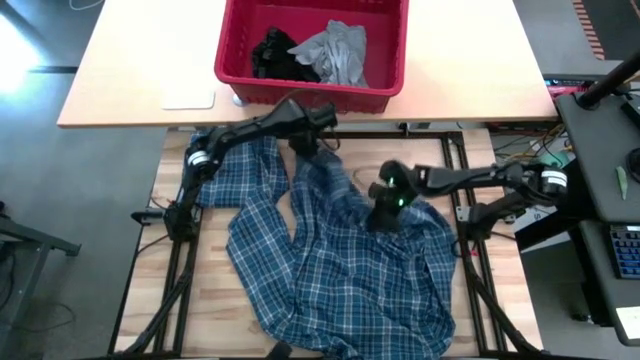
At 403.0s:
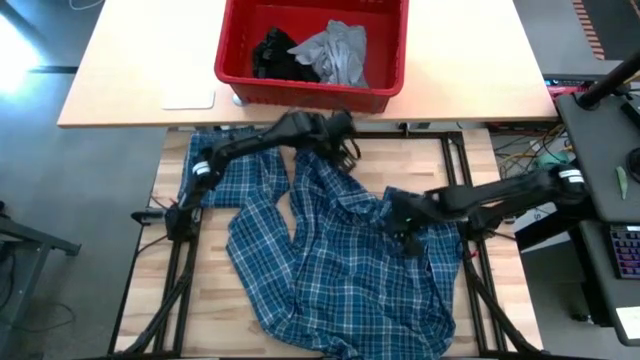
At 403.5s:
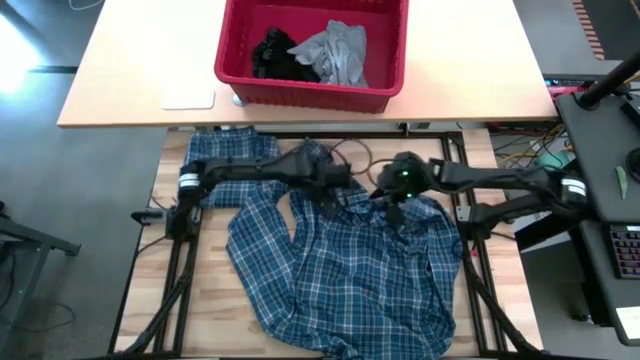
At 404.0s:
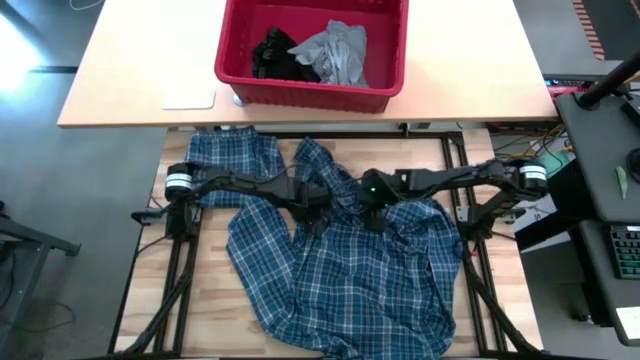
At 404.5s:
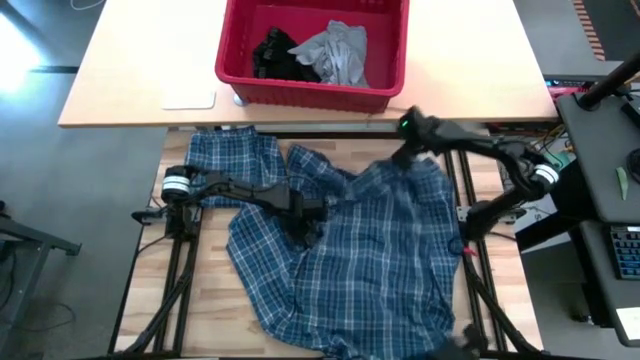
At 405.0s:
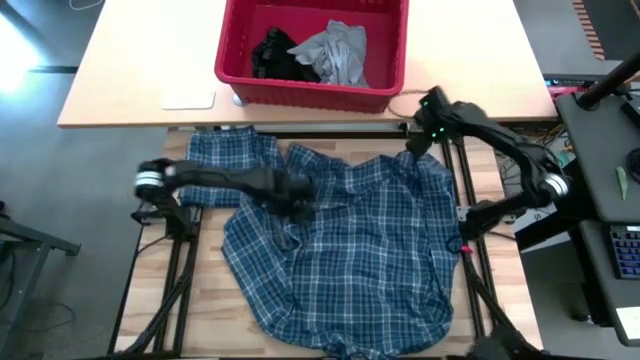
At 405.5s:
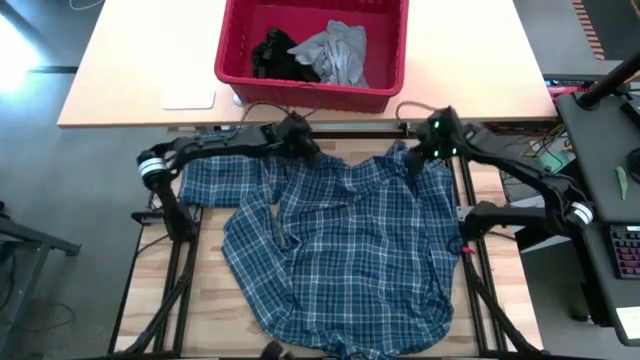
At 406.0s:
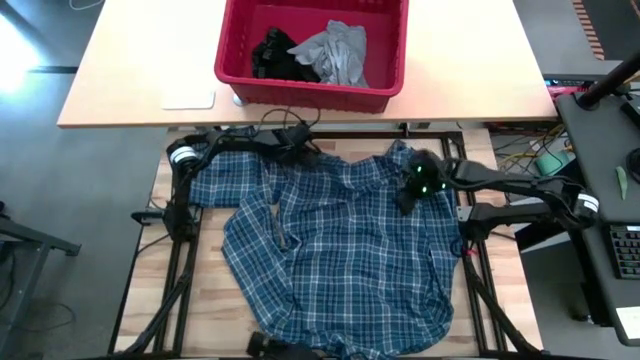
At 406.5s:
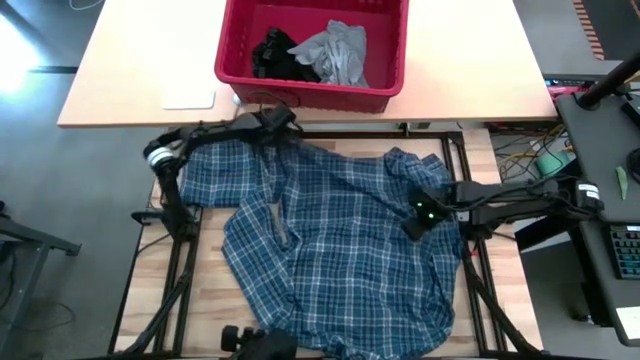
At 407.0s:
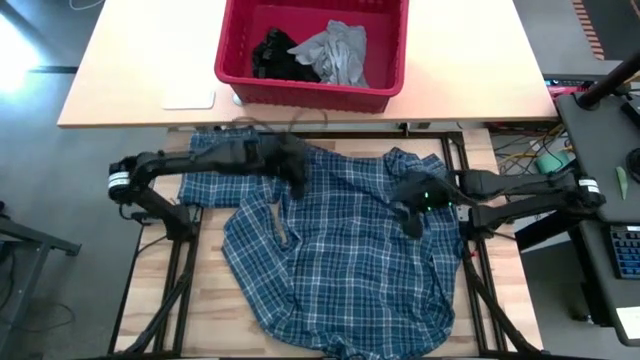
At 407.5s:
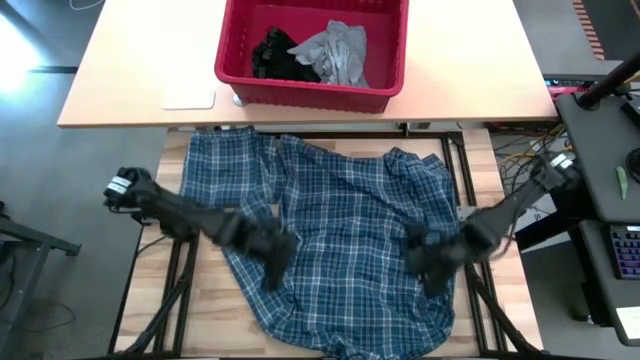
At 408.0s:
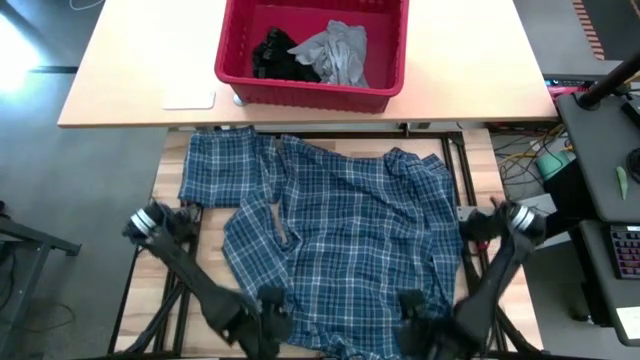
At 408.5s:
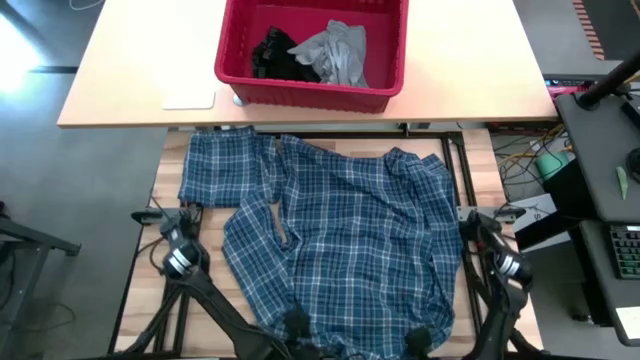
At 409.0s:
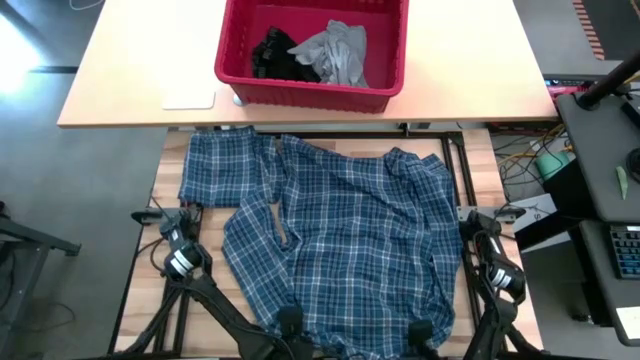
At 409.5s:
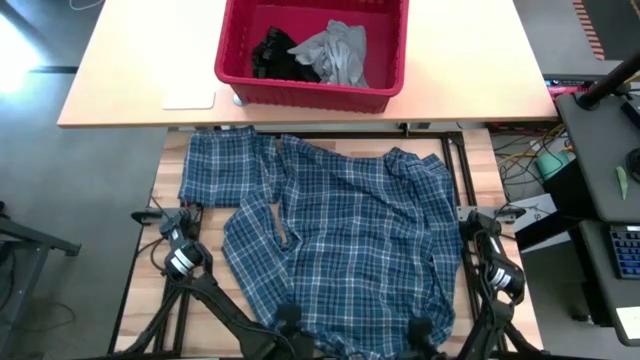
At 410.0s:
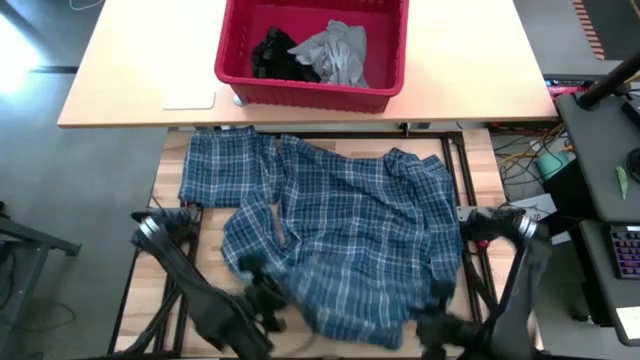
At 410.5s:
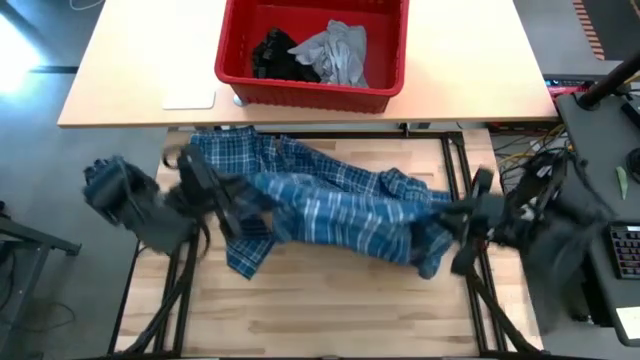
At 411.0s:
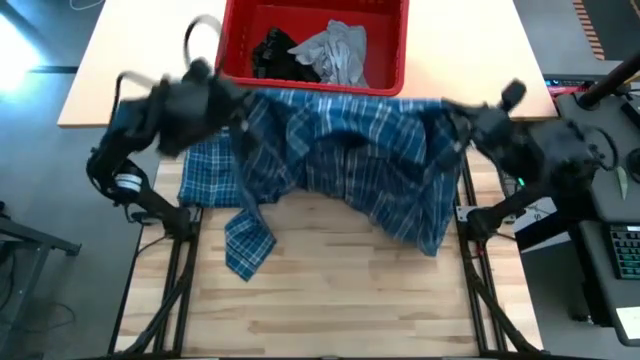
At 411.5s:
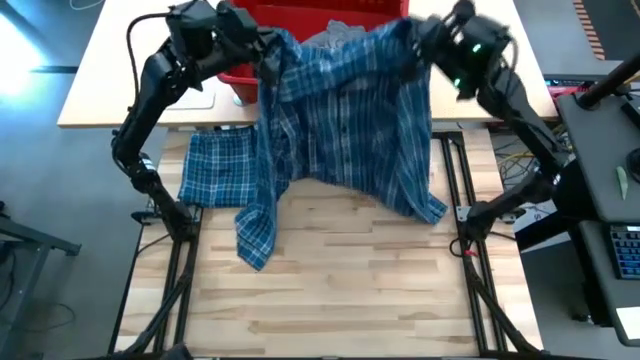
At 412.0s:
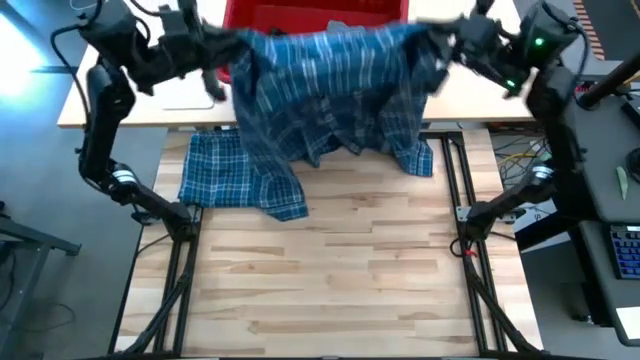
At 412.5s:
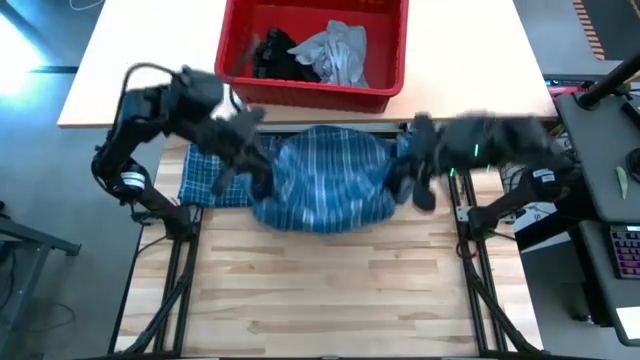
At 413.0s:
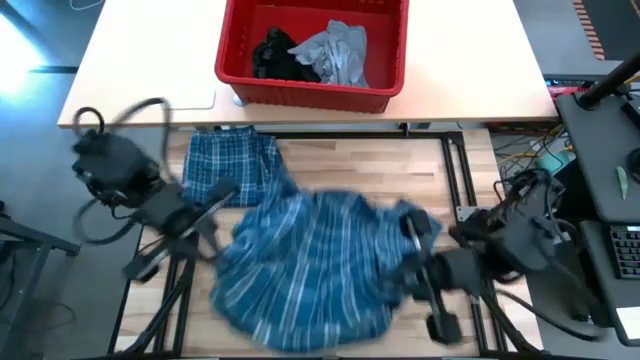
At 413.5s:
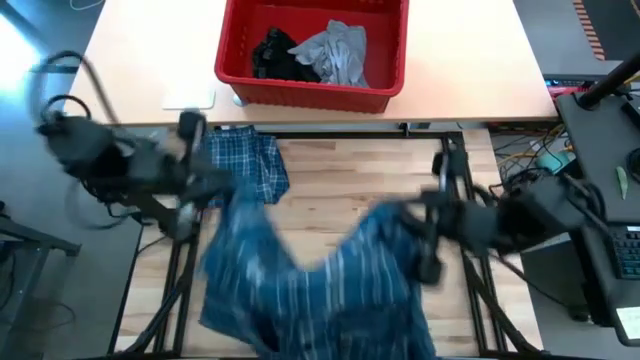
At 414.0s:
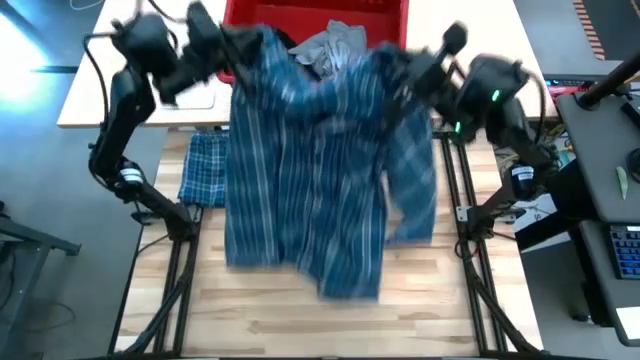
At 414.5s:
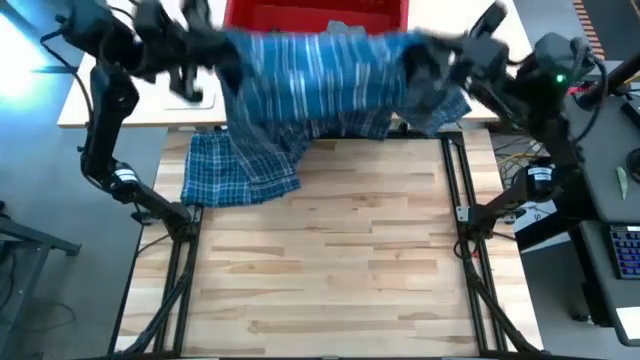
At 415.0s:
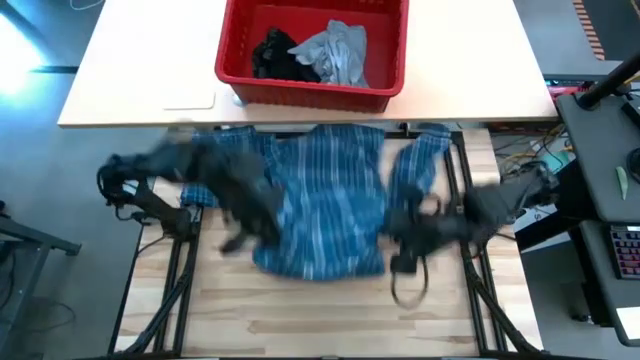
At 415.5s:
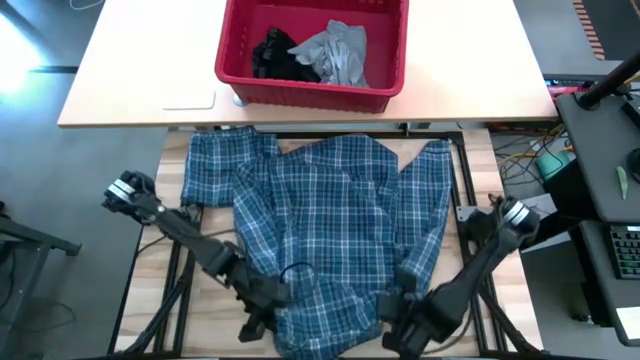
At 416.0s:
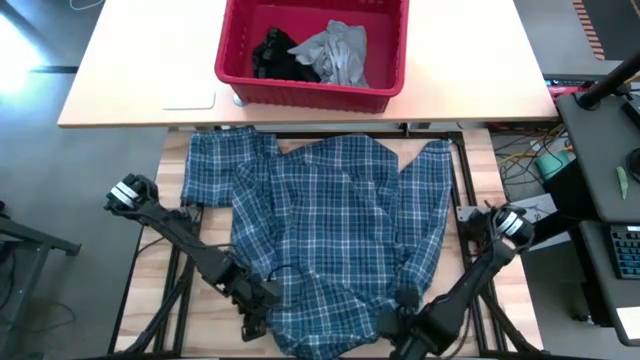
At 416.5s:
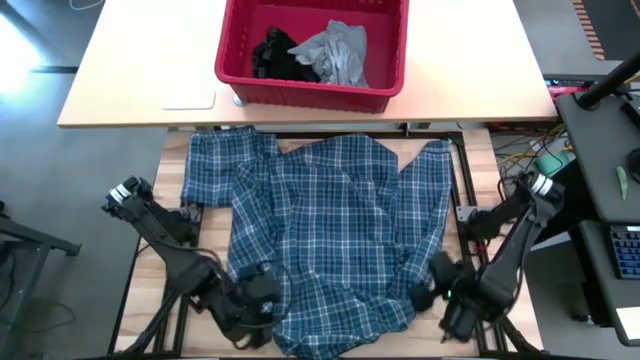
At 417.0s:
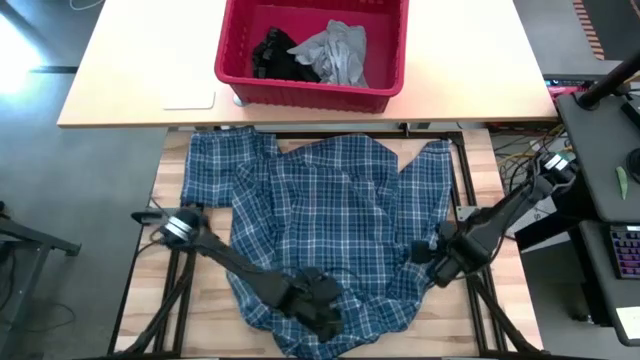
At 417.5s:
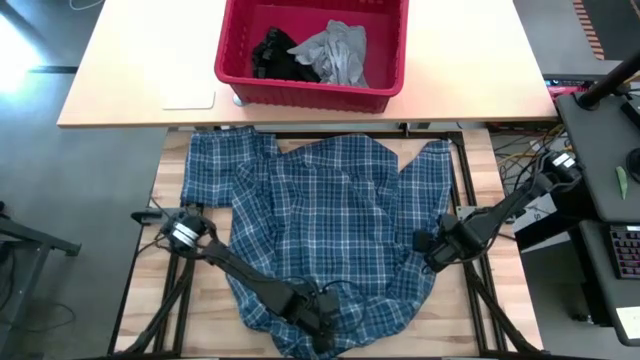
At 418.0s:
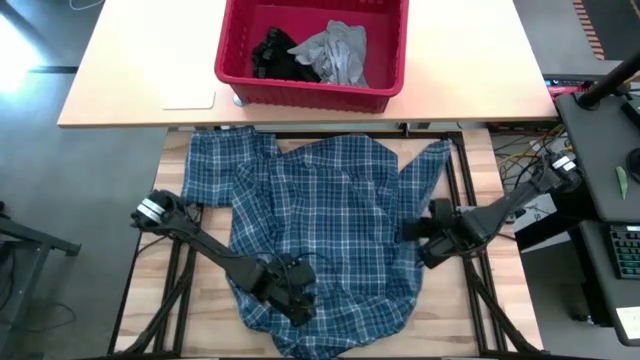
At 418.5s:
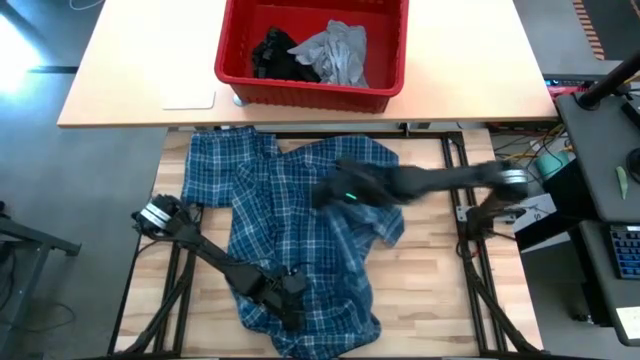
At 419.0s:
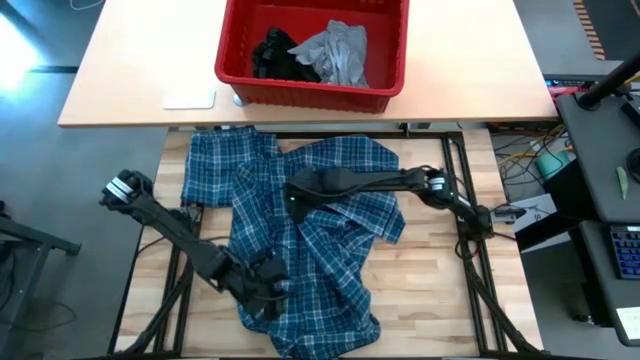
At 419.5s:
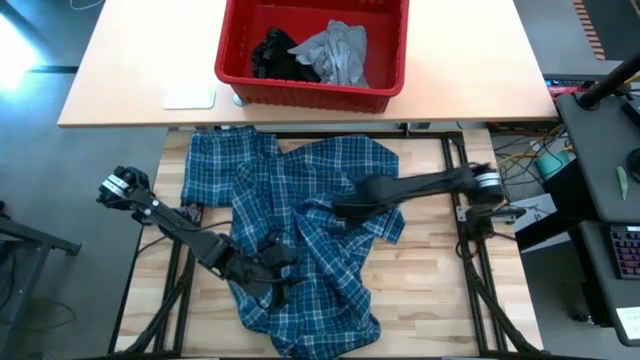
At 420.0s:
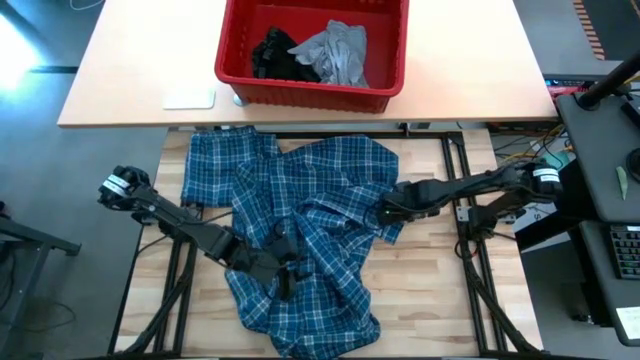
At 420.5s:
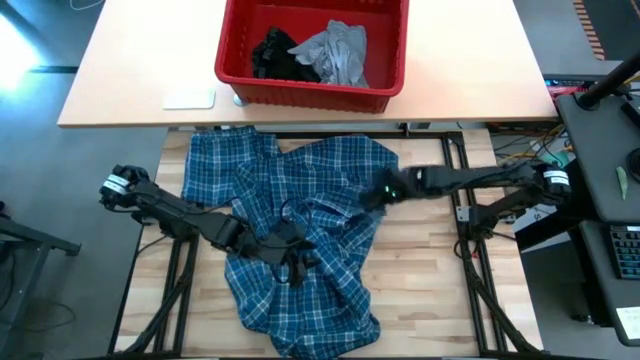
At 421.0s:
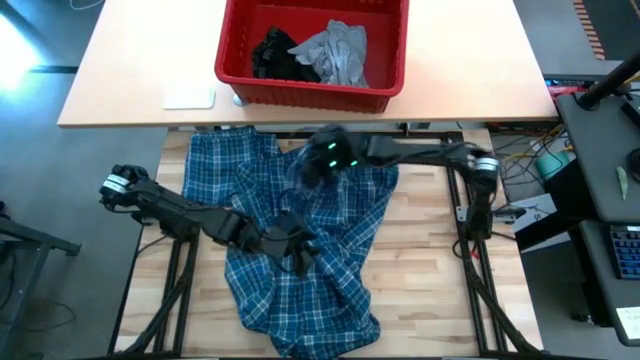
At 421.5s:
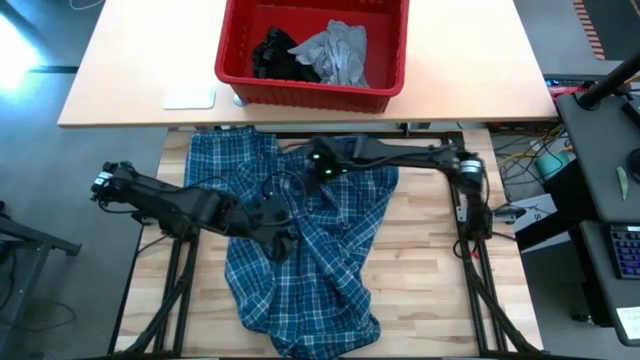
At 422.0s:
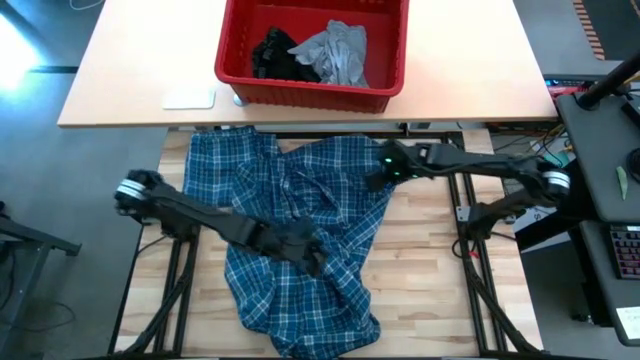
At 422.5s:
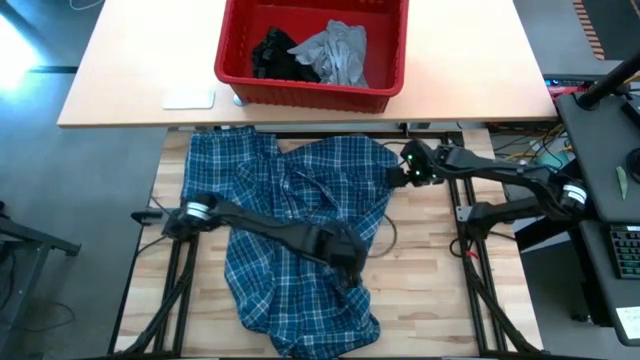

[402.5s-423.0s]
Task: Fold Laundry from Bin
Fold the blue patterned long sleeve shirt
